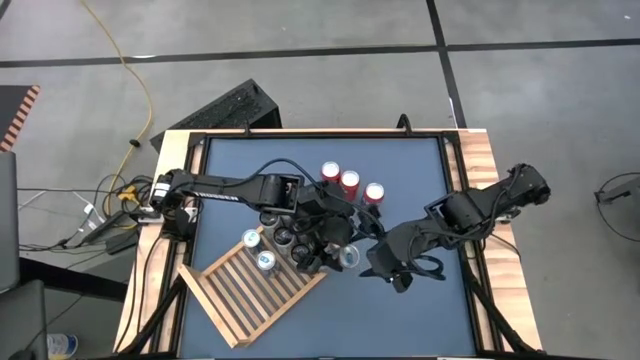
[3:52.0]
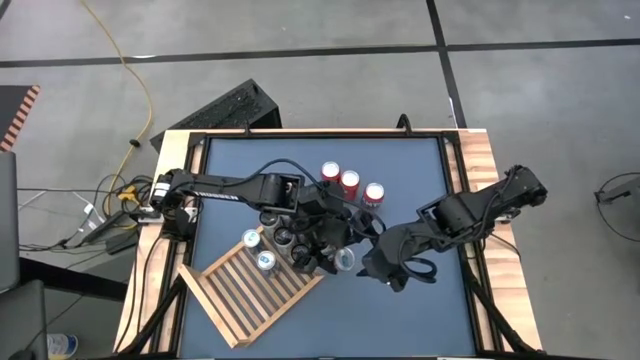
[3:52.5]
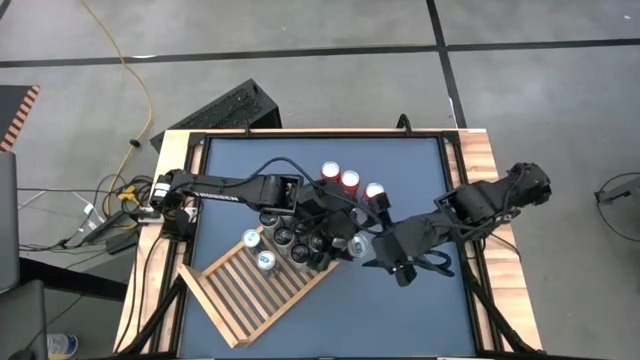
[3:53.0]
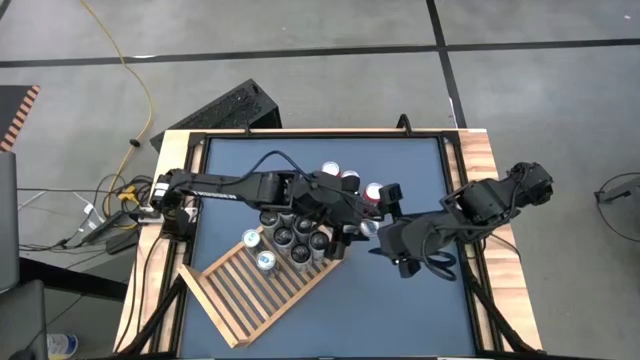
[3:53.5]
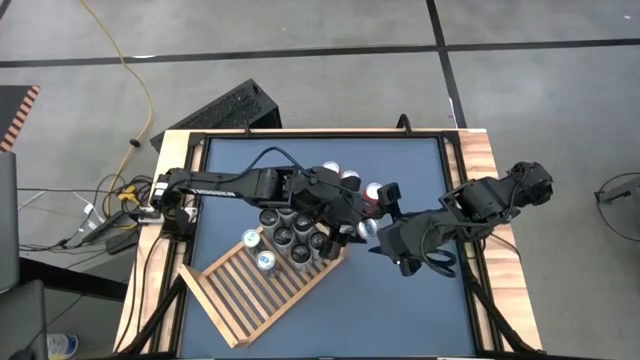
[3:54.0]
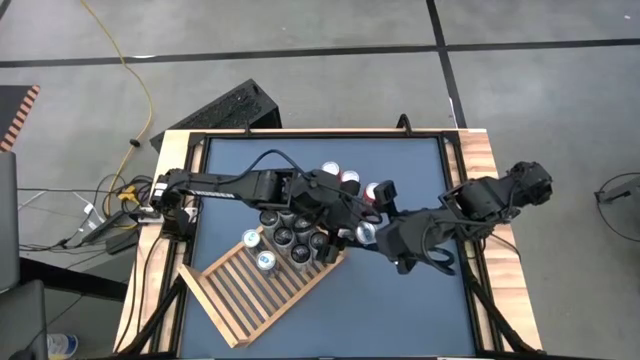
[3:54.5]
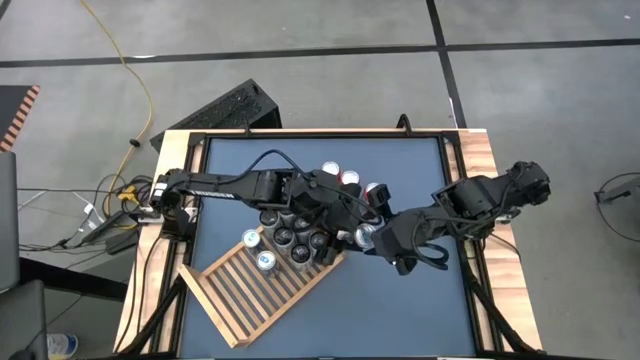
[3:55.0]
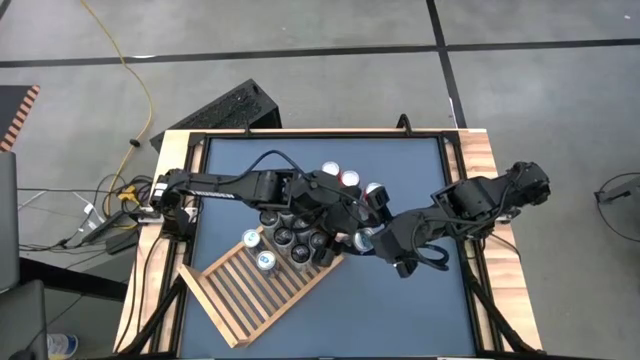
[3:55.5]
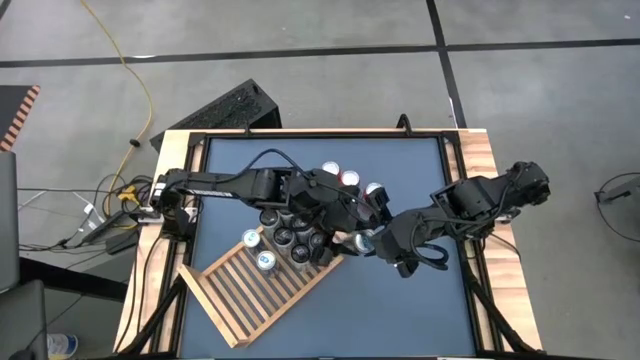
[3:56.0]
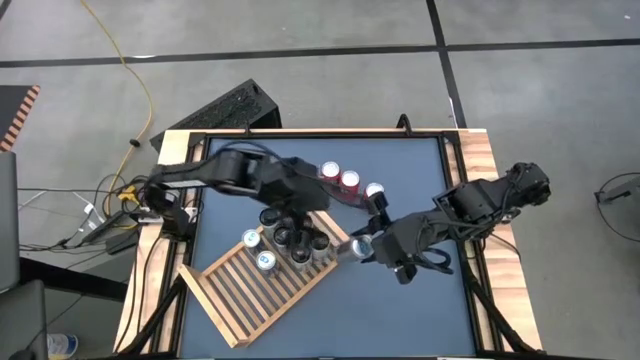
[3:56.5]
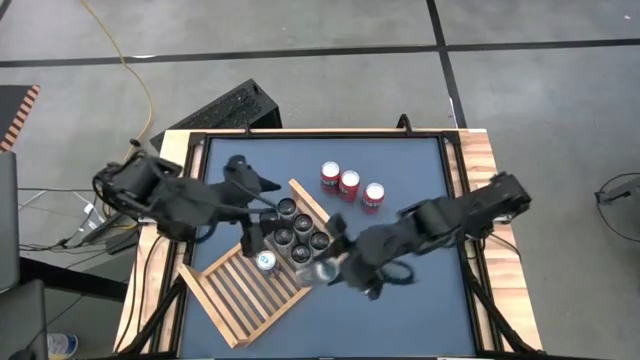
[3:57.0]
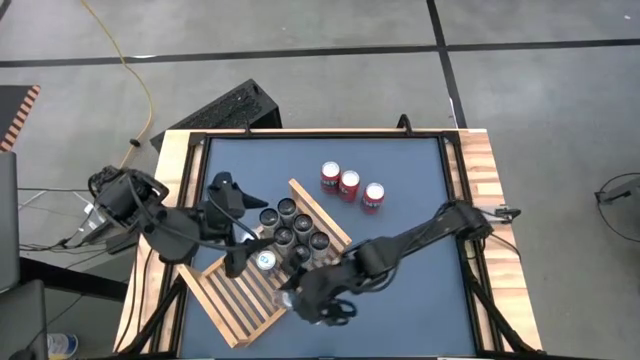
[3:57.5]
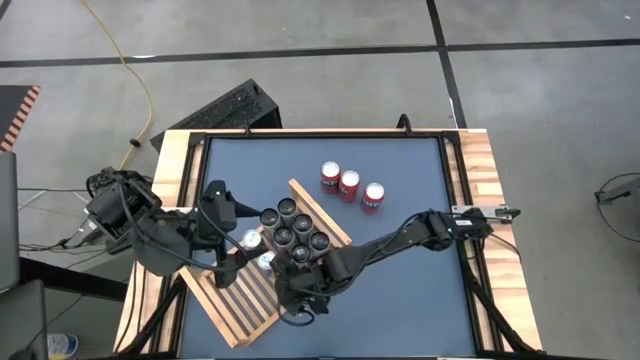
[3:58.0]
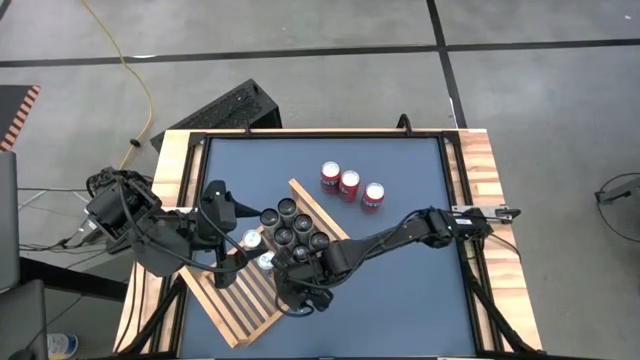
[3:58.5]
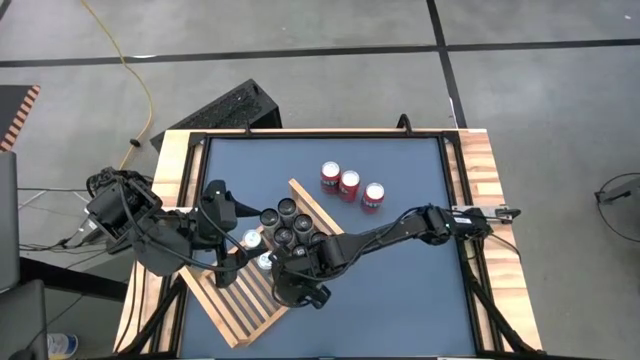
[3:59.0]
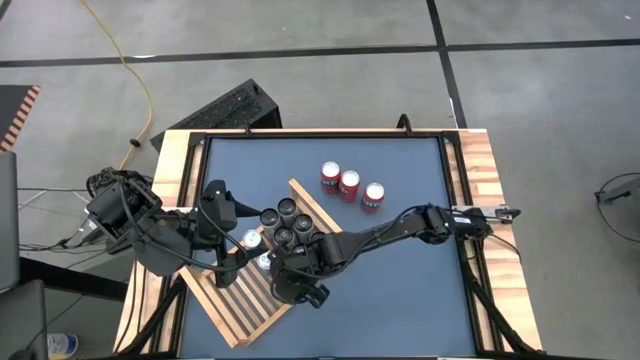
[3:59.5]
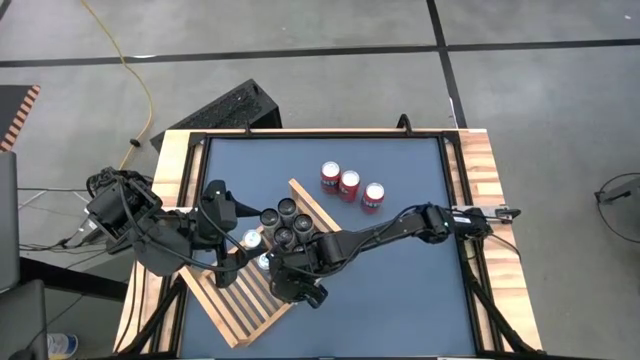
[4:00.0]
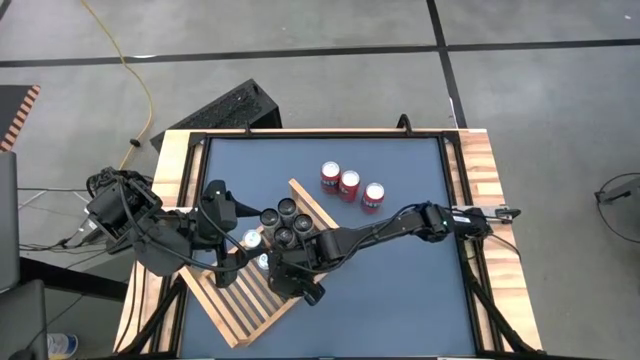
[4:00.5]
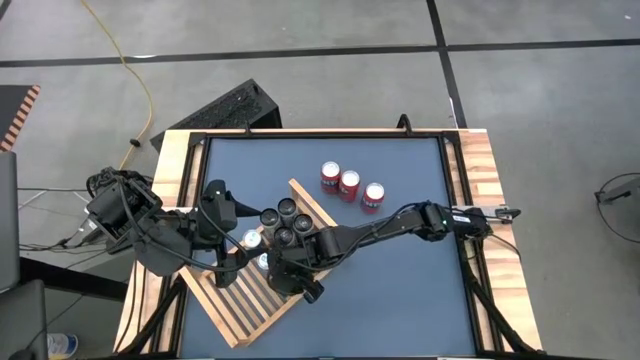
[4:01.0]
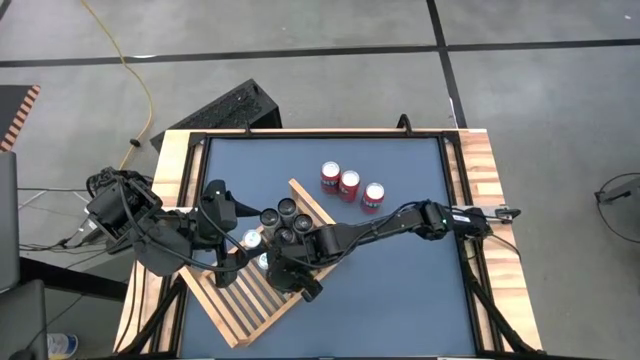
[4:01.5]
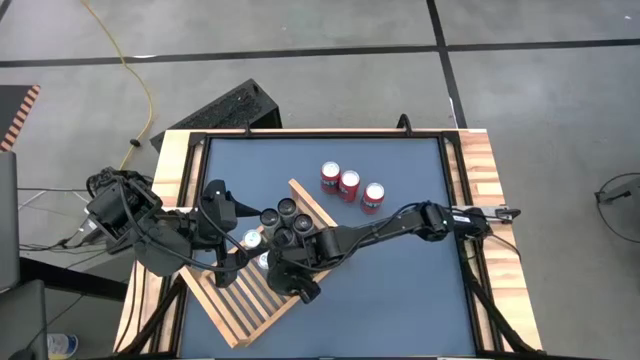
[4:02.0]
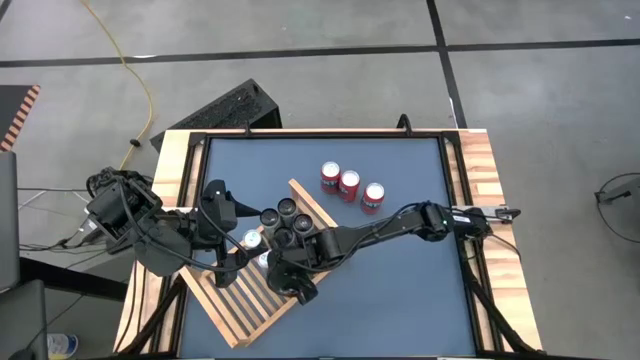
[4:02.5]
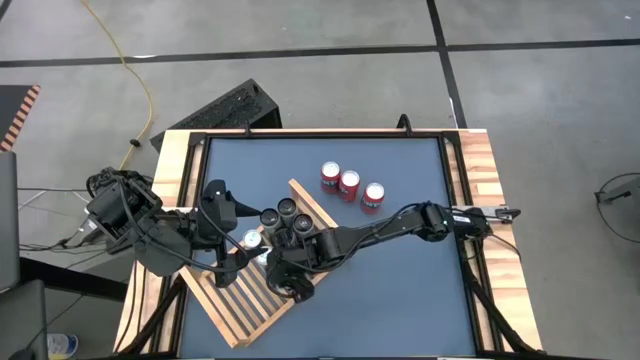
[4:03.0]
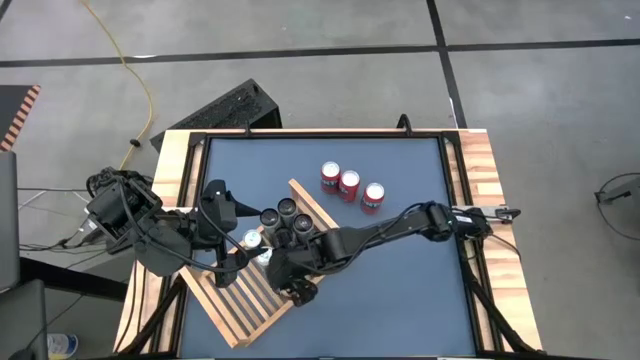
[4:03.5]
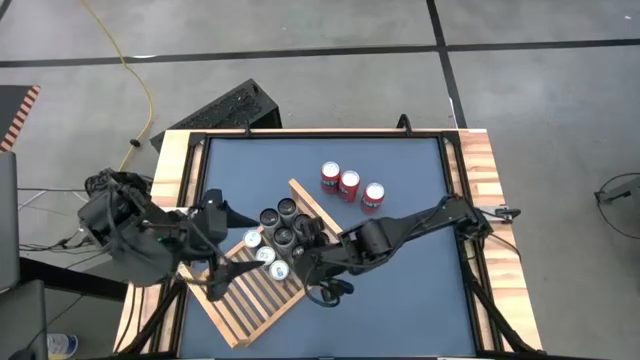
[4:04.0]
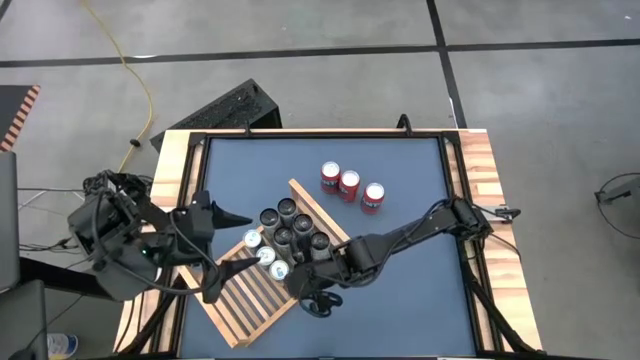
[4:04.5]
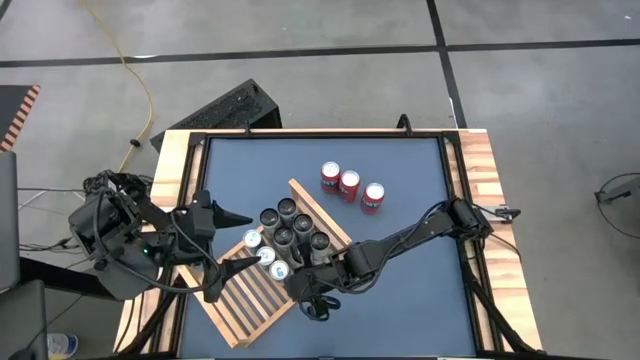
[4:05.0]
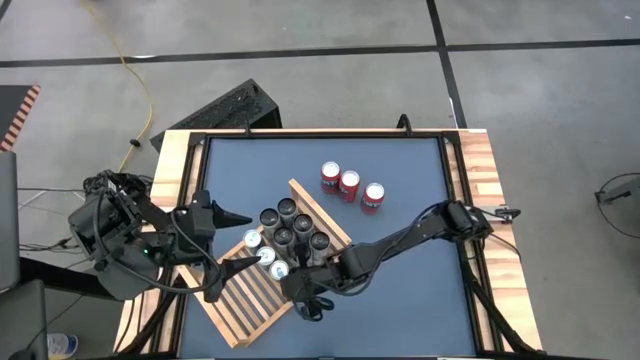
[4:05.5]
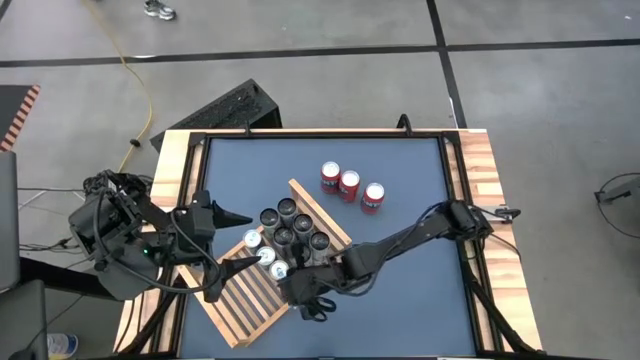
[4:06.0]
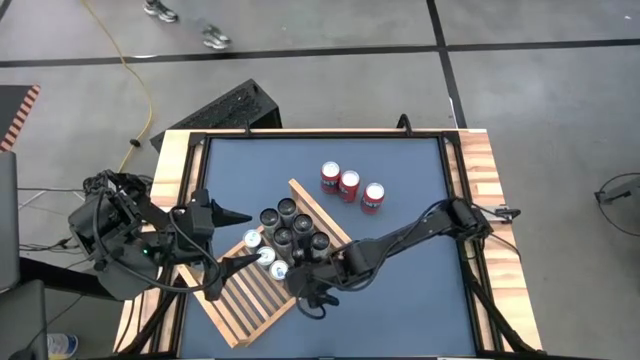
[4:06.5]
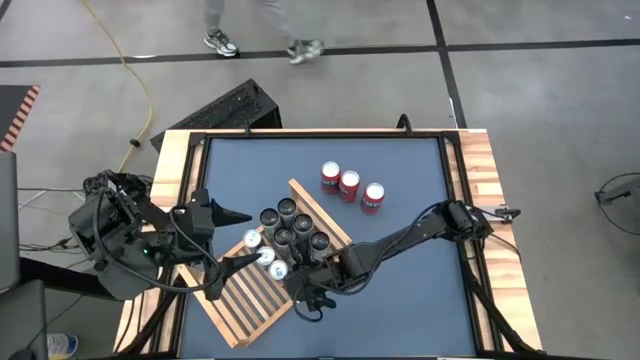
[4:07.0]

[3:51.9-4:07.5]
Task: Place canned beverage on shelf
Put the blue soda can on the shelf aligned with the other blue soda cans

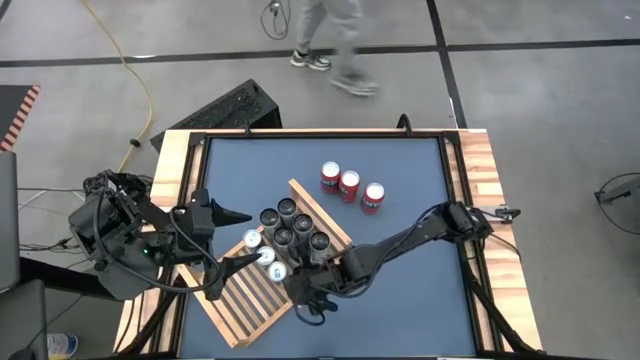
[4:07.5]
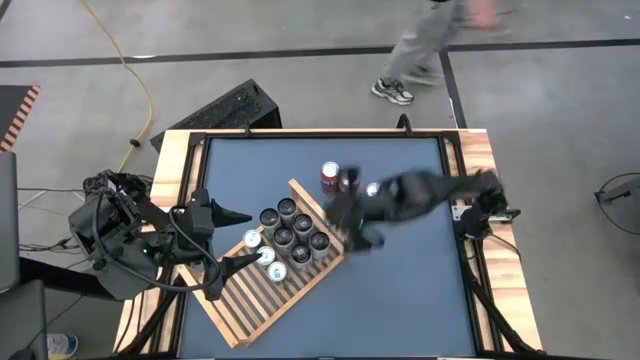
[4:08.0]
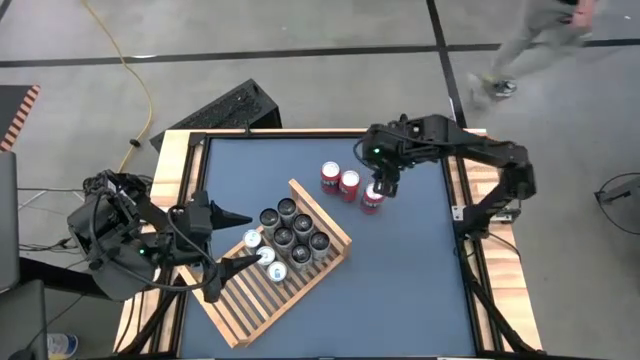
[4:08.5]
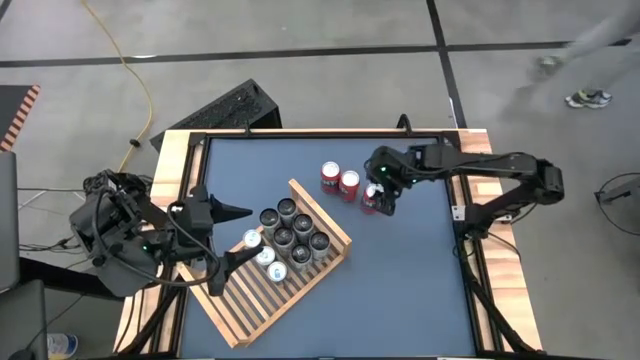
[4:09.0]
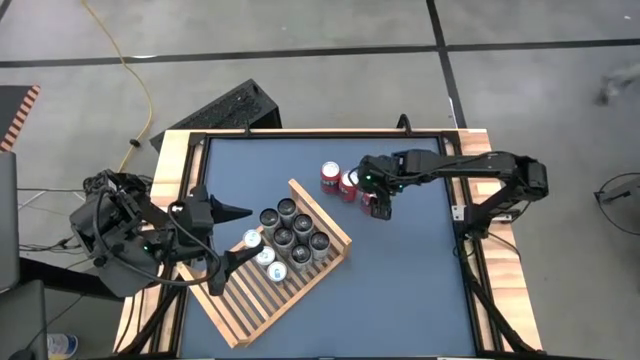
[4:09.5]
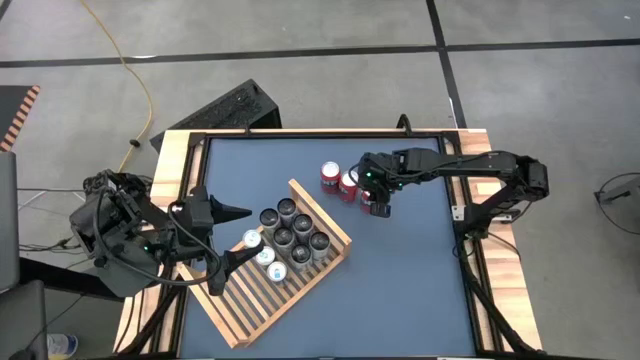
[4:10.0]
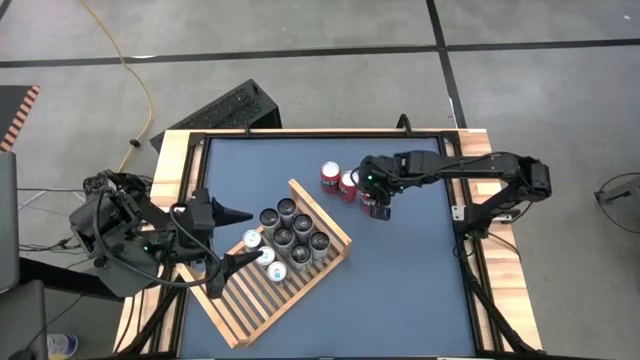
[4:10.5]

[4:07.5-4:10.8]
Put the bottom red soda can on the shelf

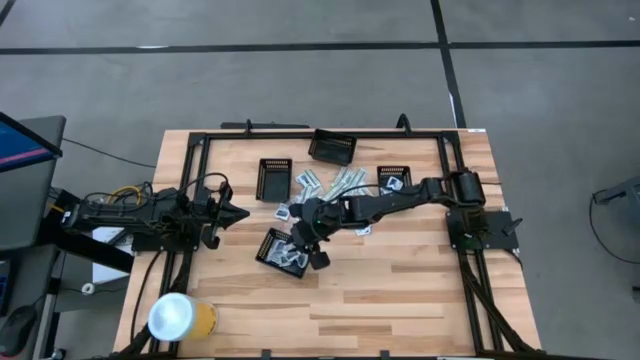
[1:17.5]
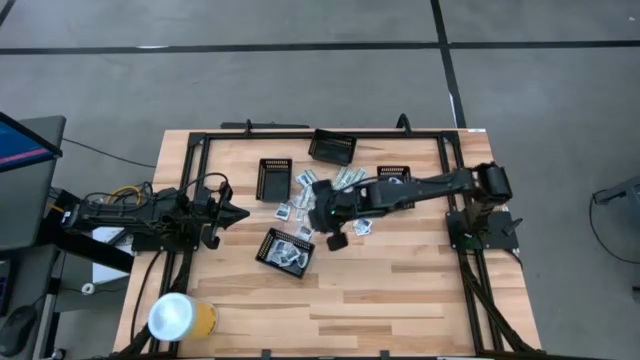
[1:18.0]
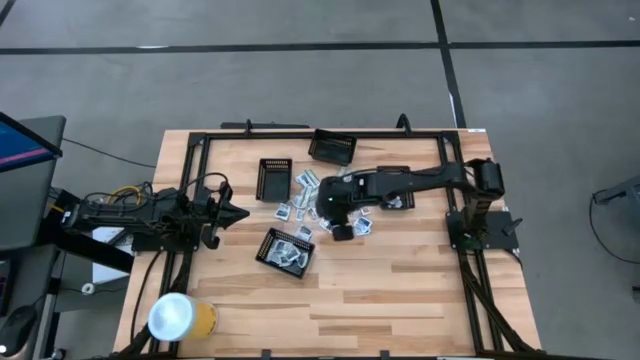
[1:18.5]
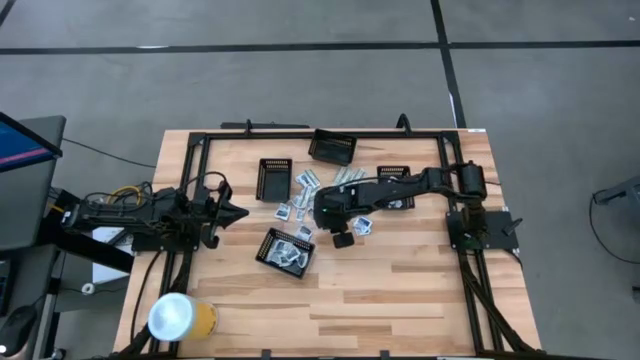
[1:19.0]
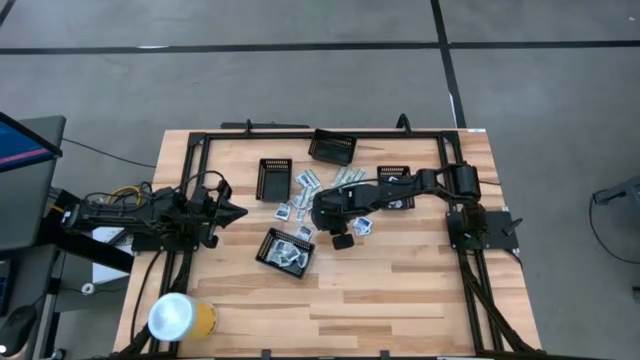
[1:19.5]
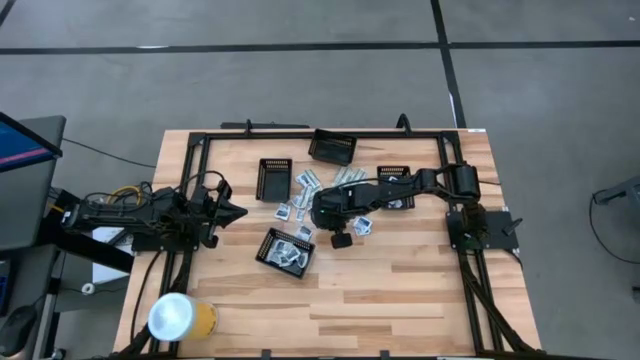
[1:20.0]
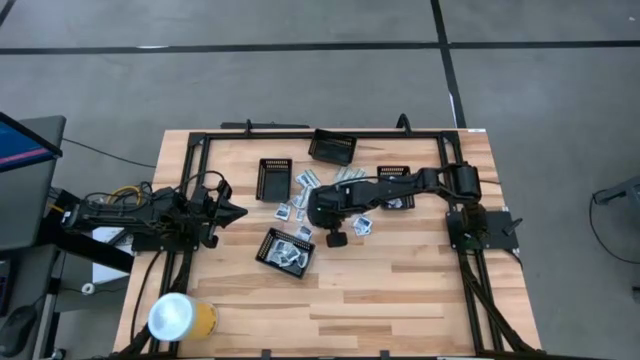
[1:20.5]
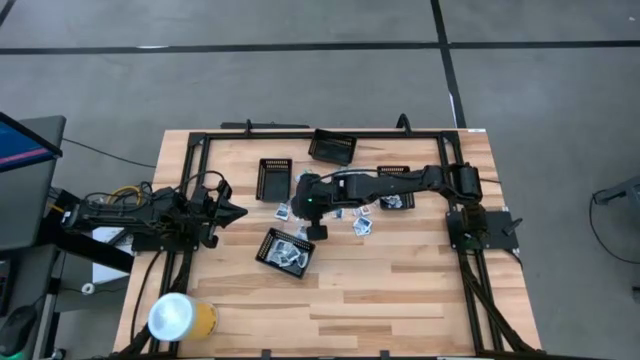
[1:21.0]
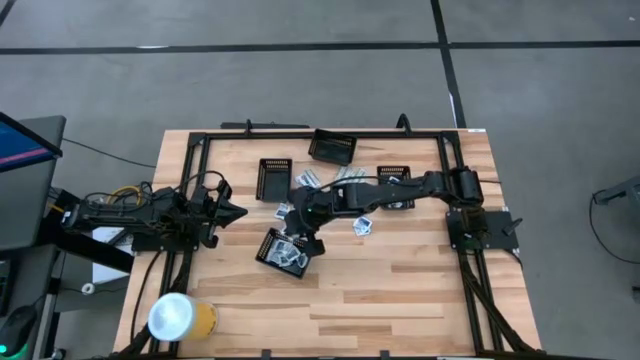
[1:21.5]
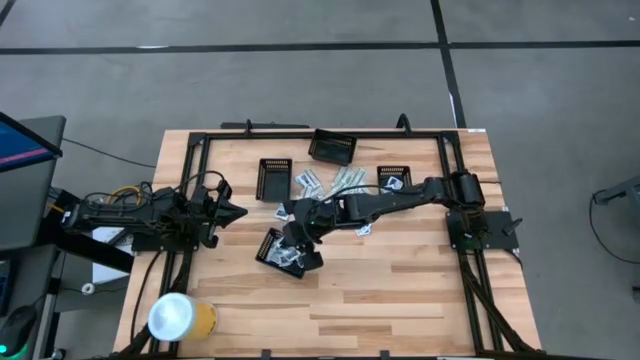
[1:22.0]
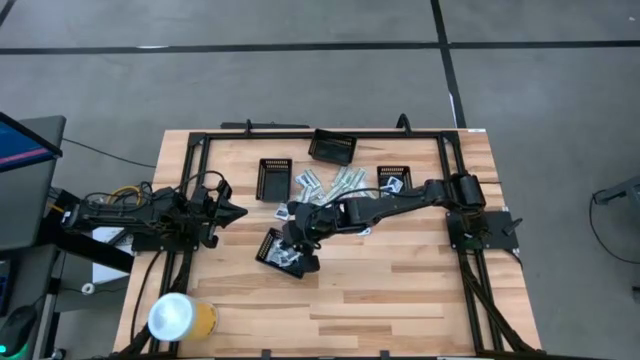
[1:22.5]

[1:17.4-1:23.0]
Task: Pick & Place First Aid Supplies
Put the white towelette pack into the bottom black bin
